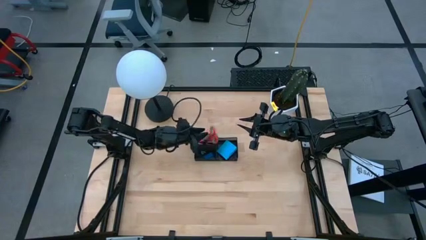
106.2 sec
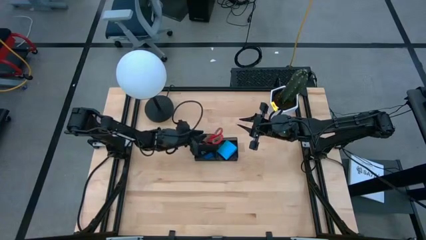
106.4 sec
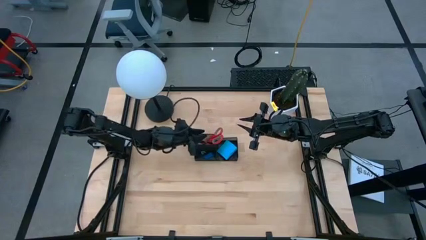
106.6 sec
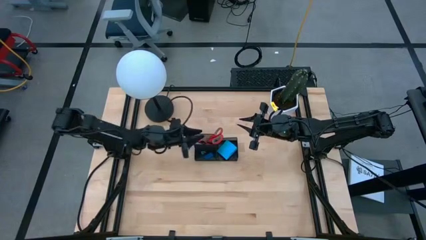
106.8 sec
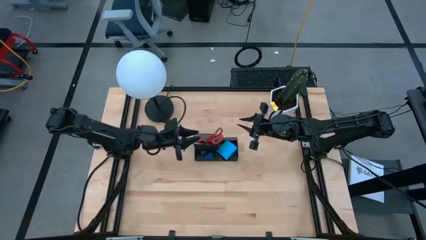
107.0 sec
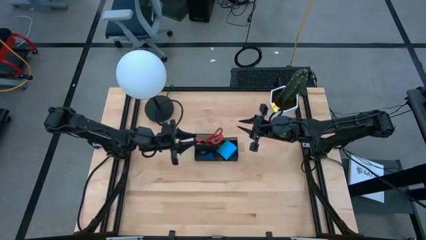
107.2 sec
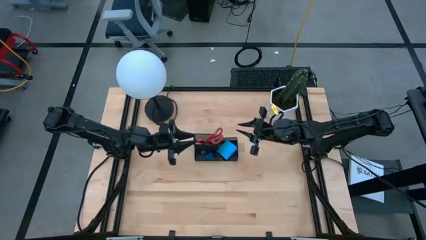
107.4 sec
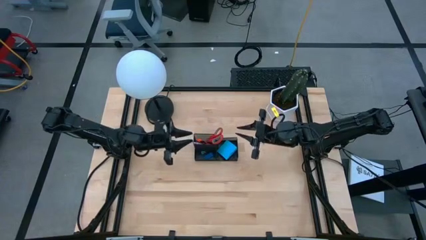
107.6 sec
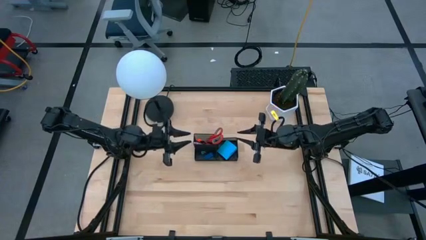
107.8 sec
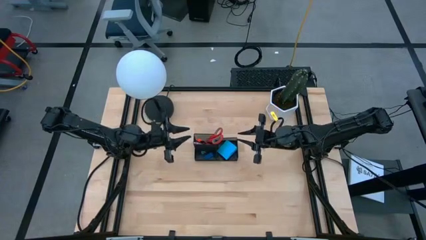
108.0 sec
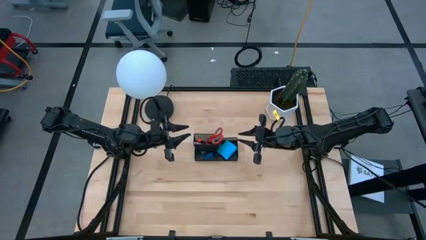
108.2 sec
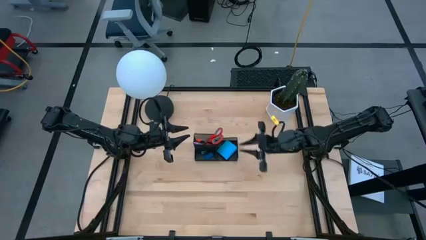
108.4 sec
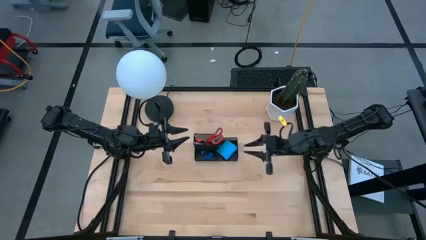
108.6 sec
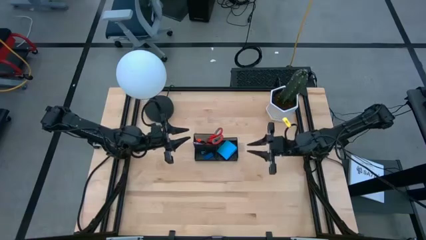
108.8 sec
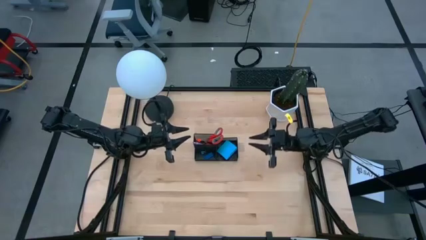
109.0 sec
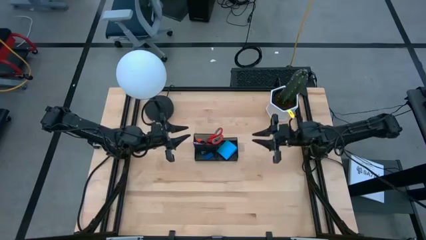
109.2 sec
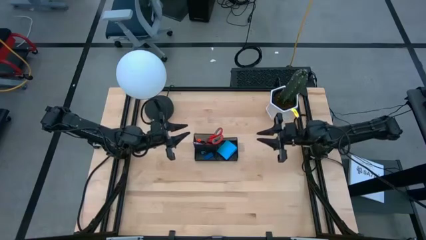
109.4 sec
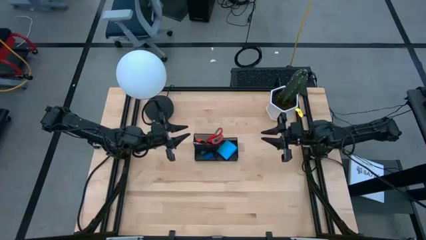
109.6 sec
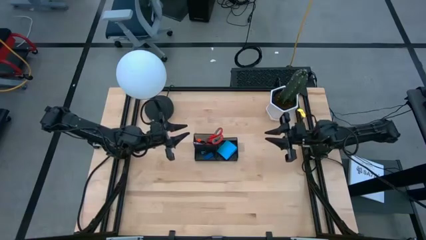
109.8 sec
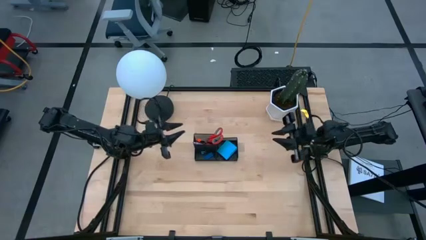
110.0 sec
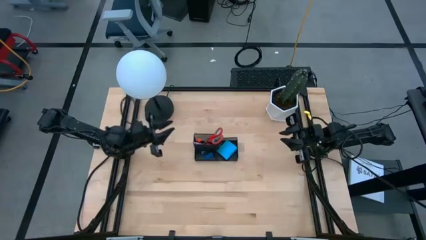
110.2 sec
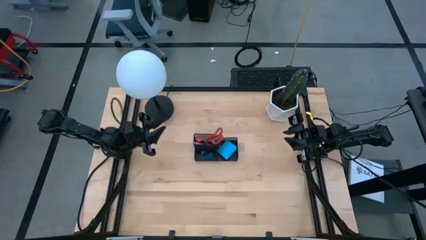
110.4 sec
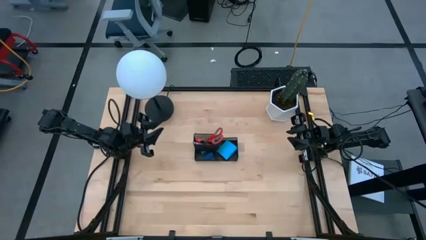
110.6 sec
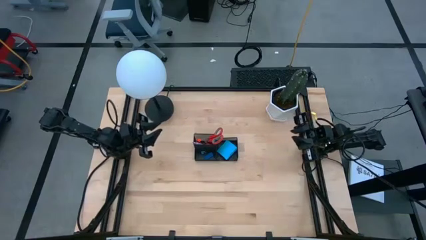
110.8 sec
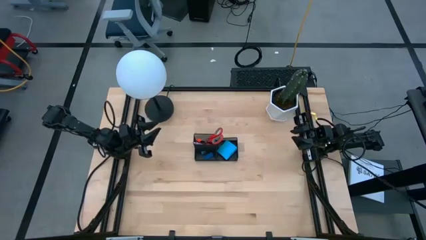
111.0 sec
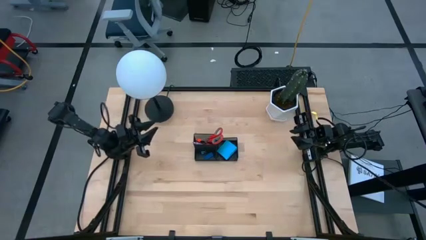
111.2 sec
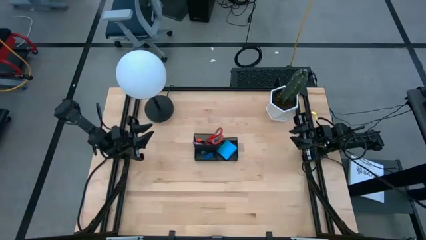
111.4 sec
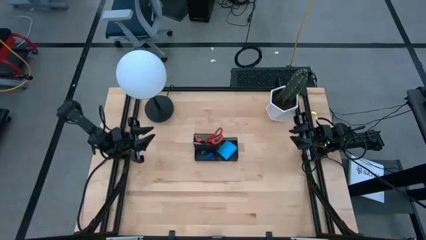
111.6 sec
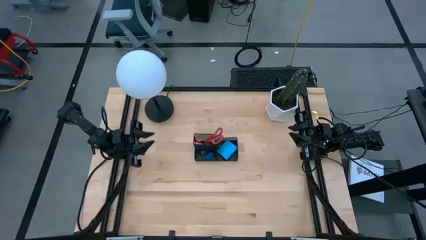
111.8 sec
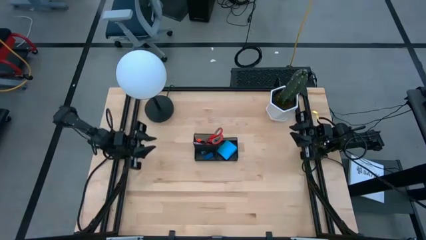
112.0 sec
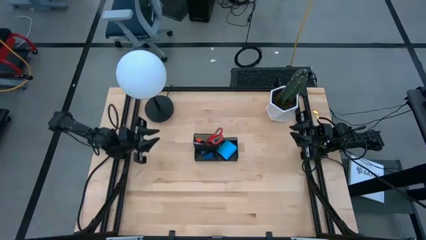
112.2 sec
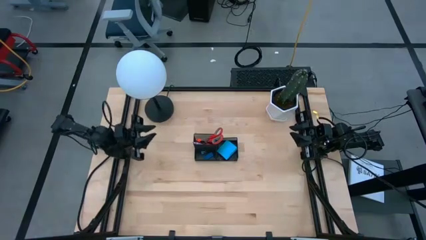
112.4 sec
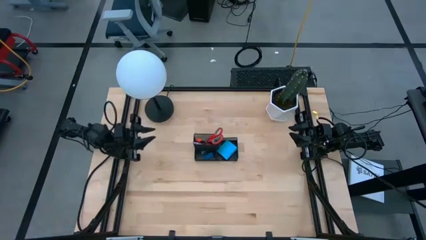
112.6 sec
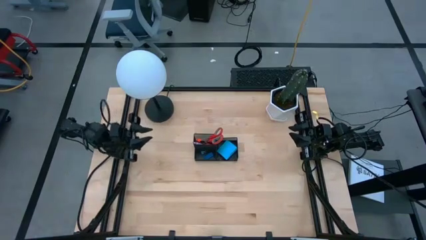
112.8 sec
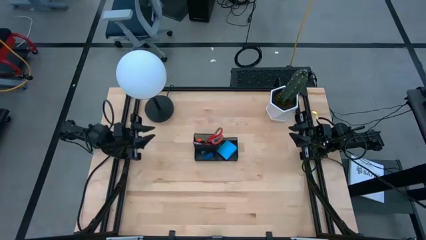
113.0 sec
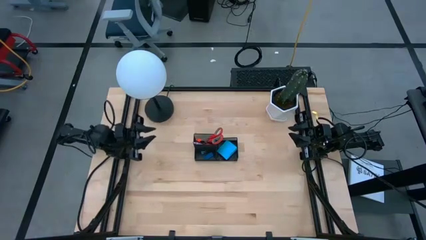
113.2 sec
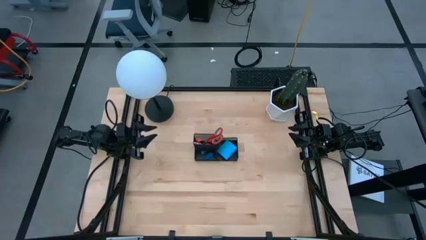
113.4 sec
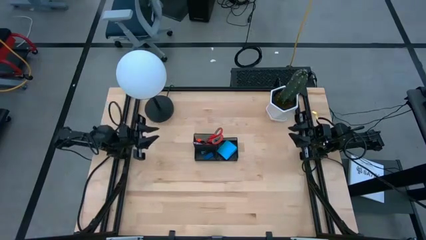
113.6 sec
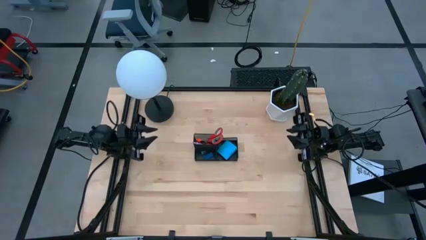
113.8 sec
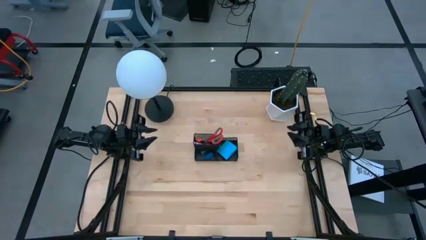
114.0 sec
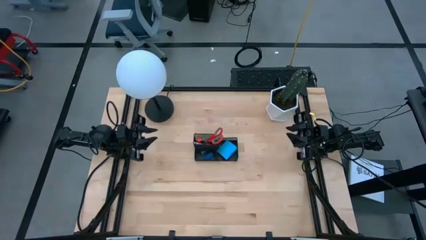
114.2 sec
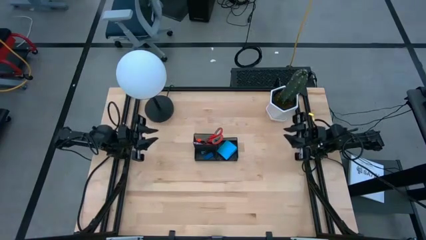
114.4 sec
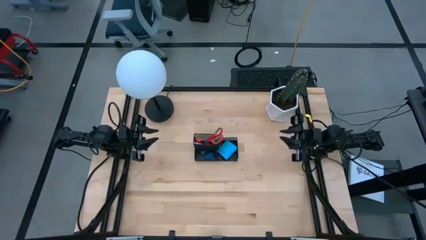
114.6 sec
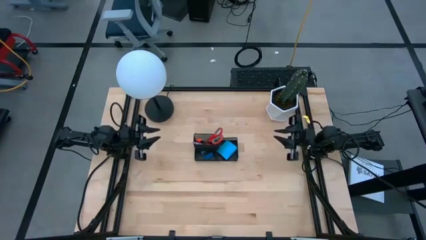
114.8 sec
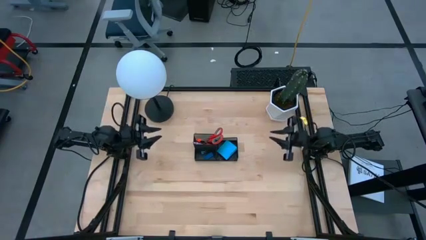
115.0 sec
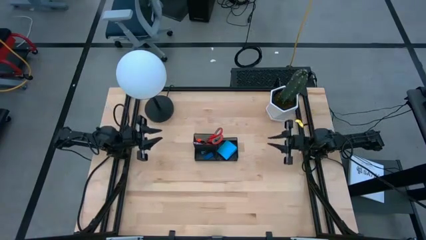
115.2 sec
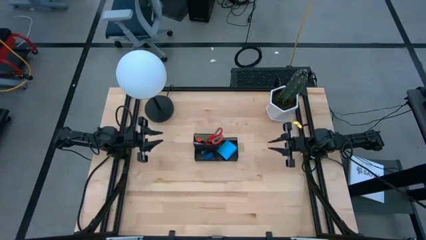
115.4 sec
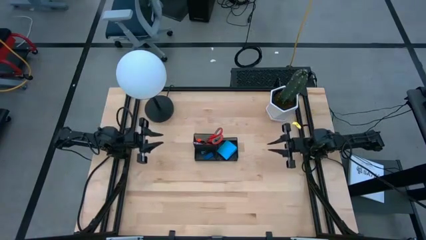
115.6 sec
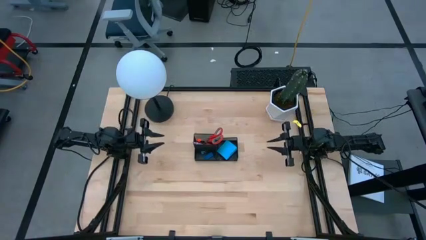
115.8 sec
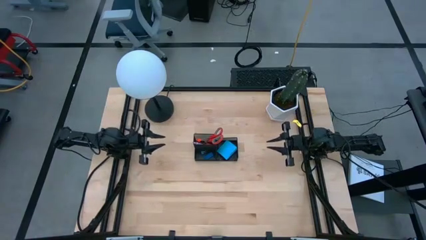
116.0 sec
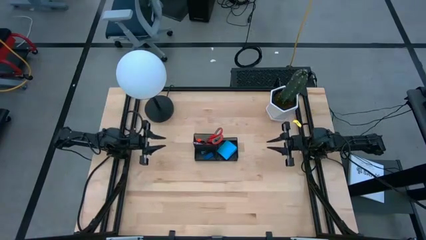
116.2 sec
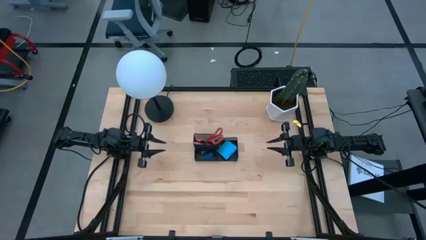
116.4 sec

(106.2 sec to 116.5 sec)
Task: Pick and place office supplies into organizer
Return to Home Position
